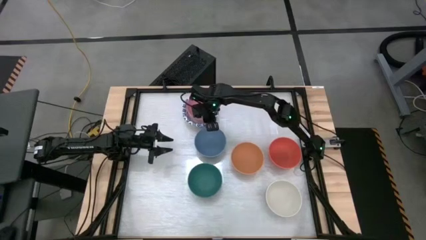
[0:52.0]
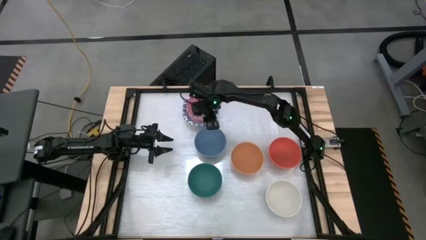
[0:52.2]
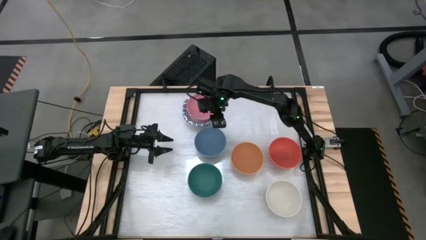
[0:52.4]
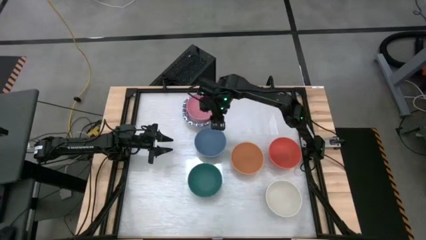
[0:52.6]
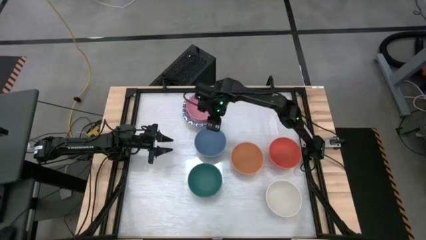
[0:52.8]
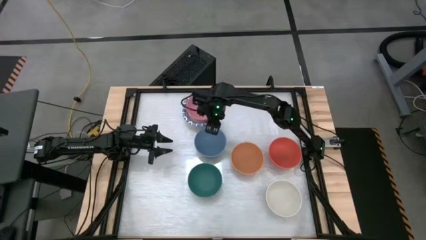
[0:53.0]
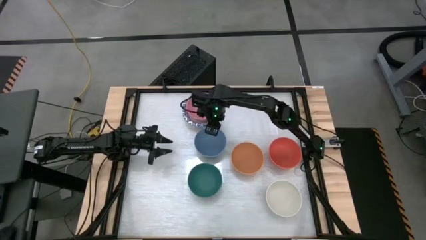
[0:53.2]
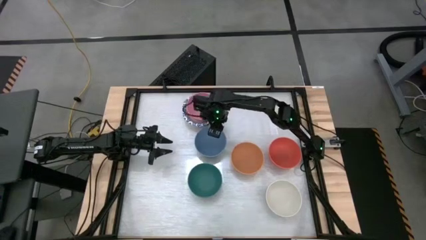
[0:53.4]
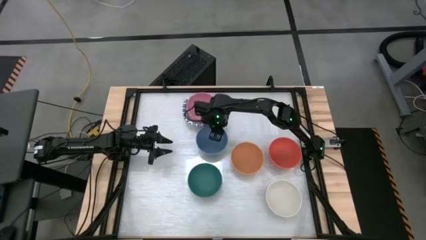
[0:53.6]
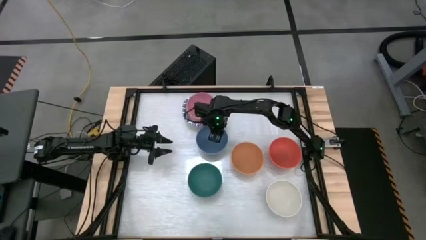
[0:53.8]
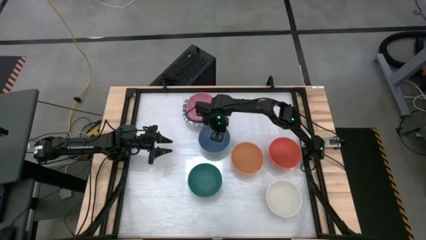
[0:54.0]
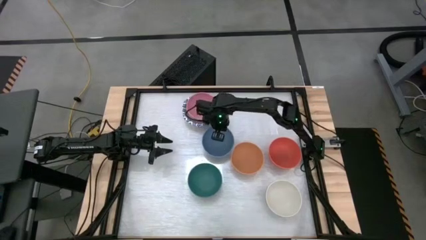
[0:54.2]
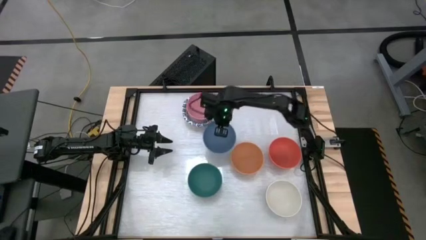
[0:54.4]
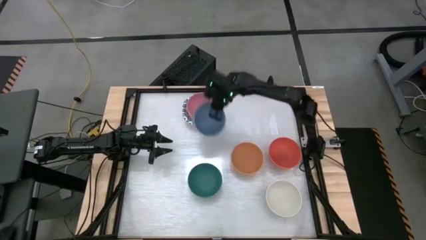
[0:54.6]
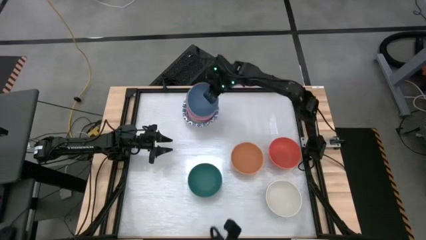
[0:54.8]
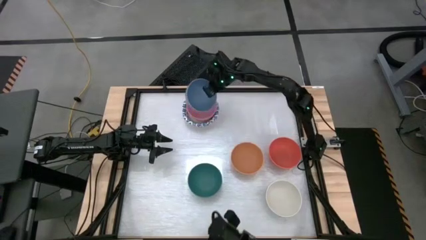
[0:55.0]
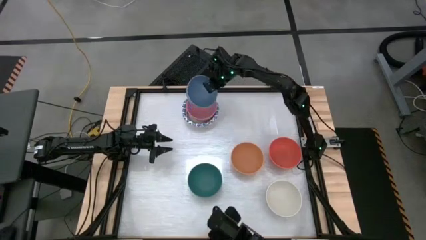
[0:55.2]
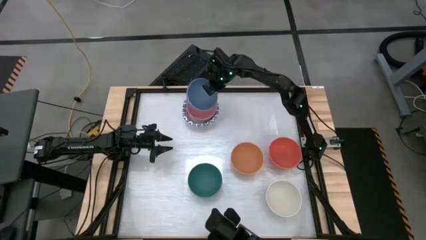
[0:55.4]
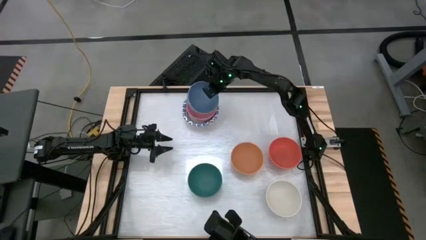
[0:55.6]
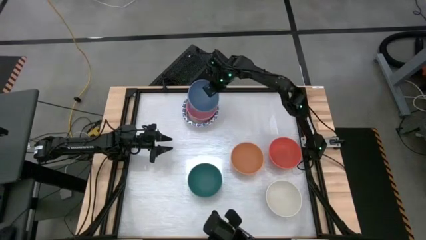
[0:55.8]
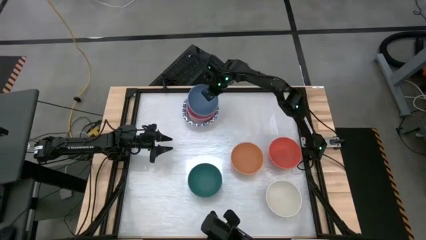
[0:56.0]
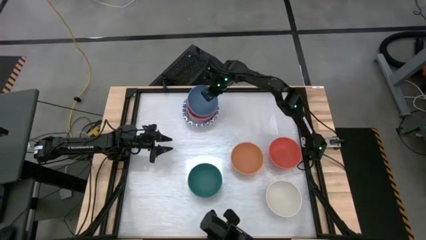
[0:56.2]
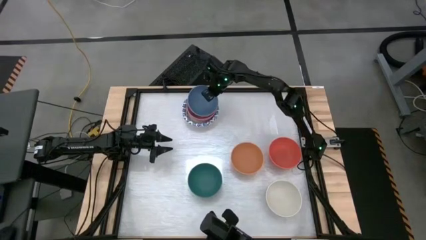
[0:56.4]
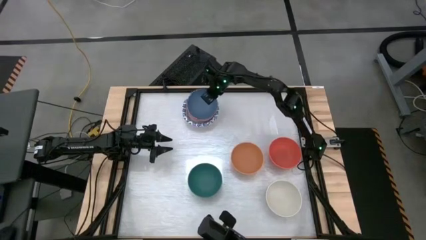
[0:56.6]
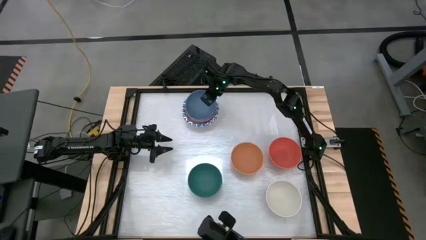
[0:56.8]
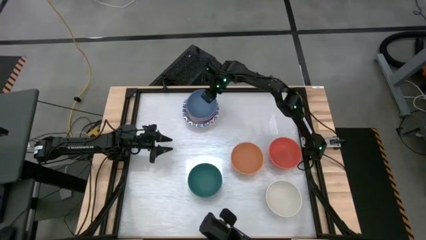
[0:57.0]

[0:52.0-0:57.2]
Stack the blue bowl on top of the pink bowl

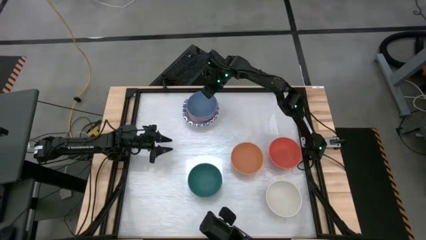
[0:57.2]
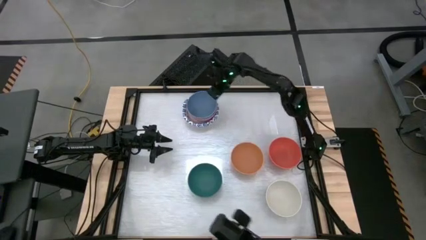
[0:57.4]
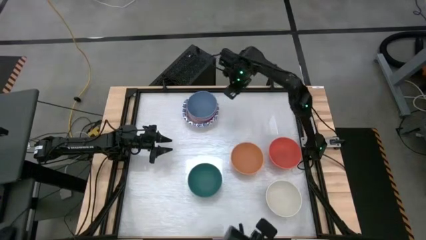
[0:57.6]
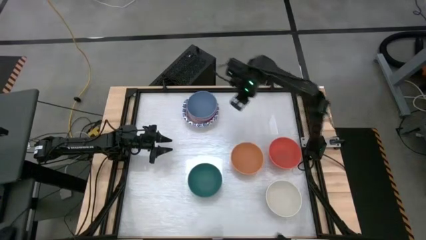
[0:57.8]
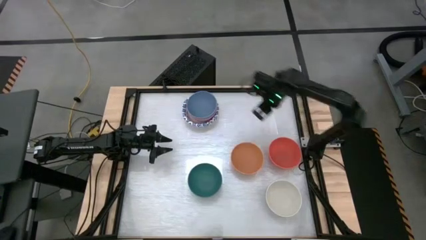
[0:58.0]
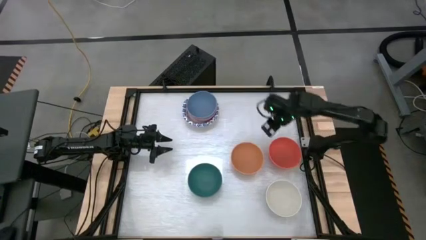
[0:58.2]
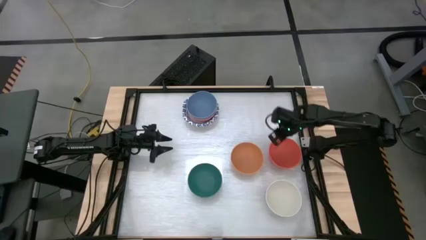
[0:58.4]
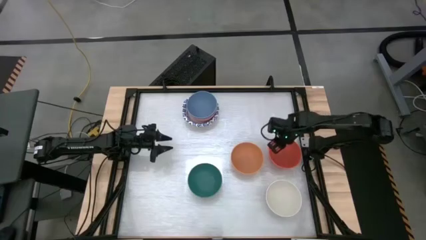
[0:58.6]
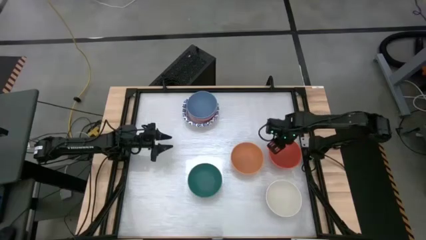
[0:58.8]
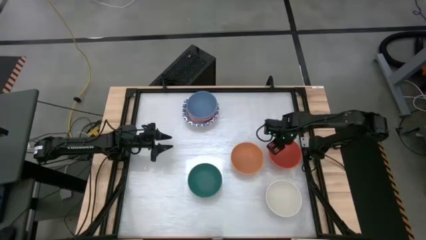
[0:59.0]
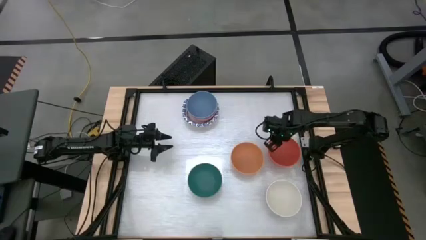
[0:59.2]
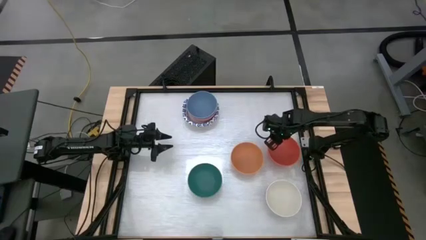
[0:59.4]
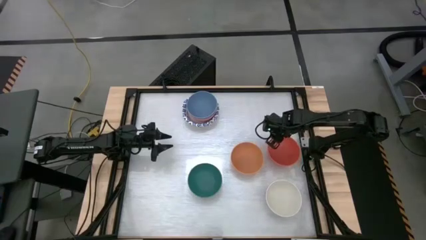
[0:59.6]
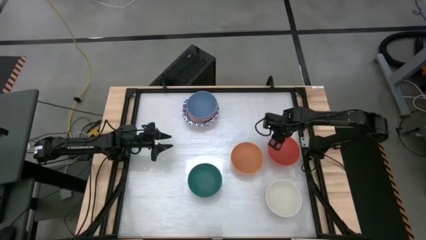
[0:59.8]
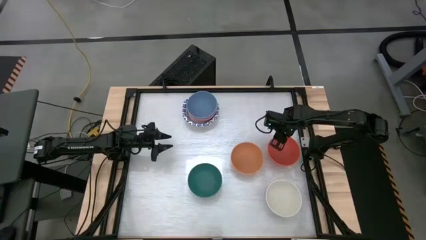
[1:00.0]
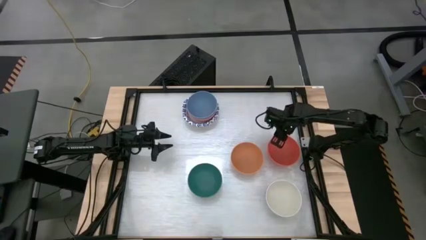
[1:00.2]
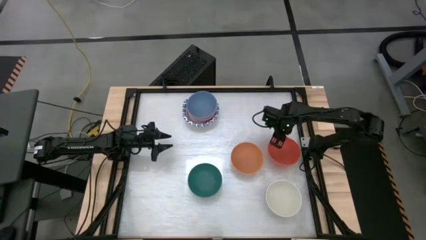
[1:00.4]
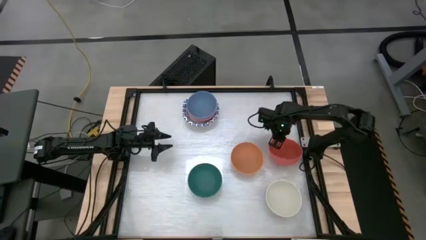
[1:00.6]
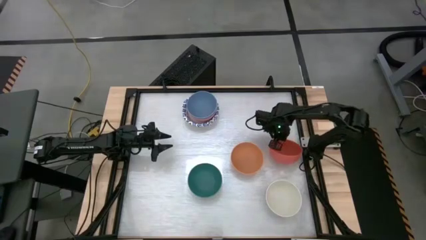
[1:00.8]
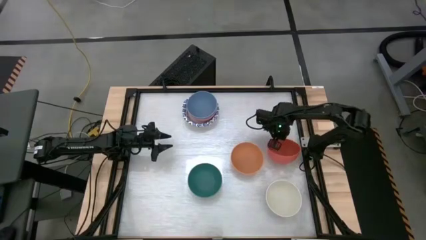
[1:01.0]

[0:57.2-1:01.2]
Stack the orange bowl on top of the blue bowl

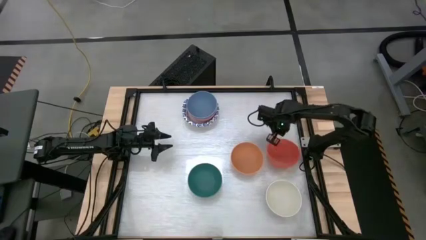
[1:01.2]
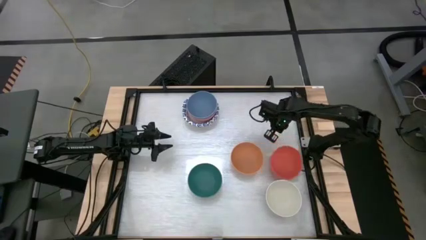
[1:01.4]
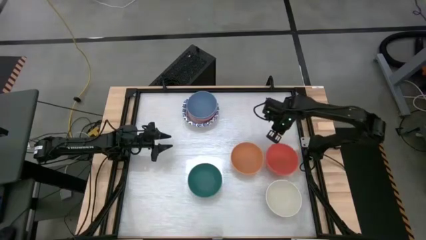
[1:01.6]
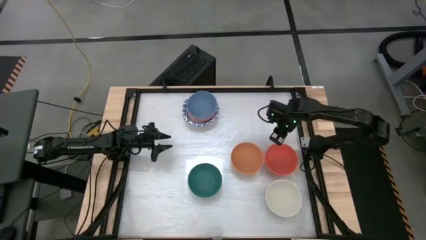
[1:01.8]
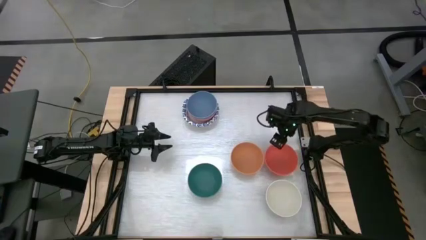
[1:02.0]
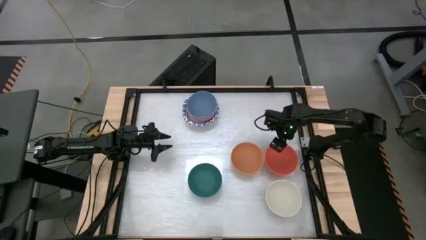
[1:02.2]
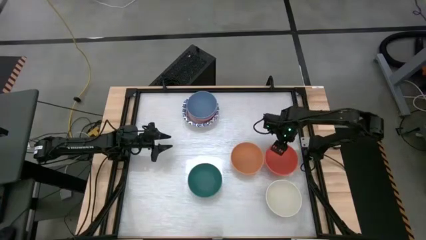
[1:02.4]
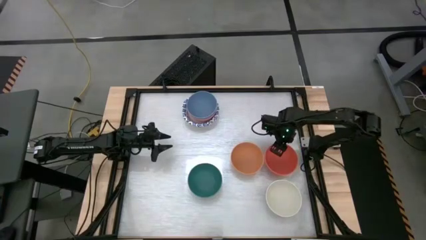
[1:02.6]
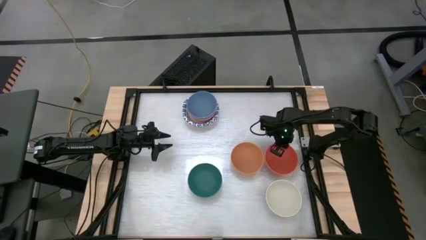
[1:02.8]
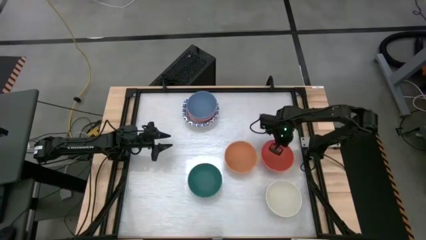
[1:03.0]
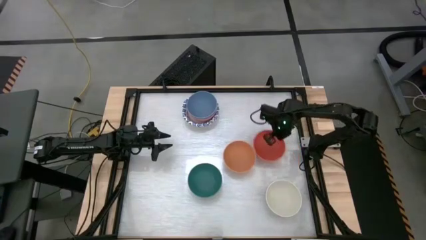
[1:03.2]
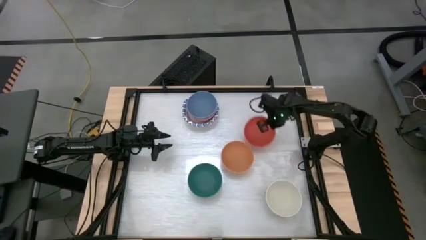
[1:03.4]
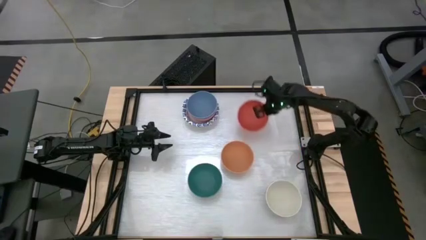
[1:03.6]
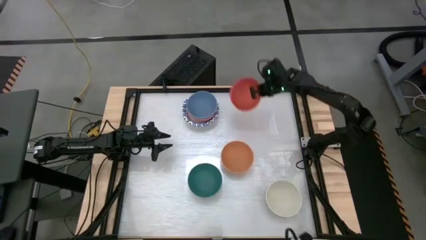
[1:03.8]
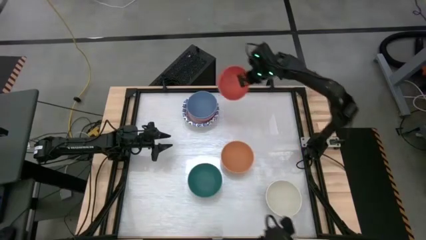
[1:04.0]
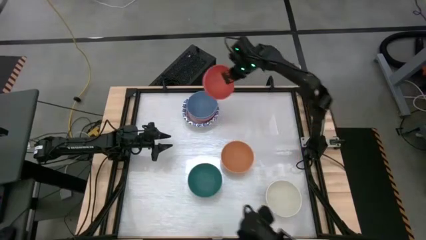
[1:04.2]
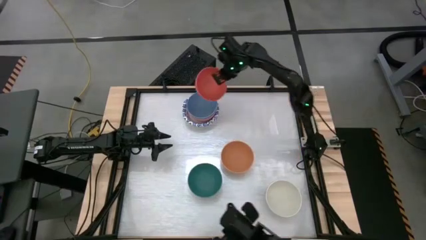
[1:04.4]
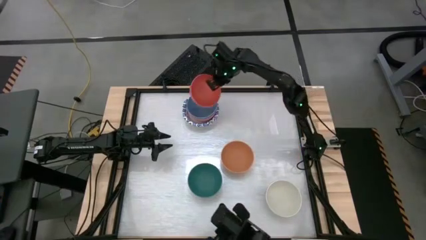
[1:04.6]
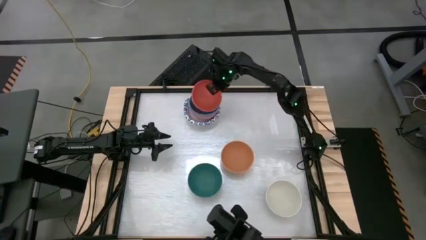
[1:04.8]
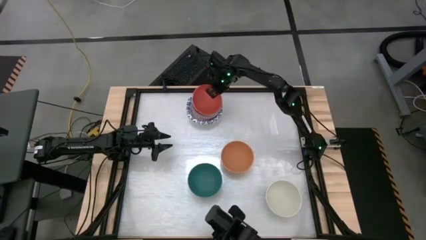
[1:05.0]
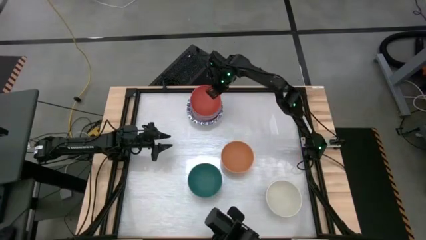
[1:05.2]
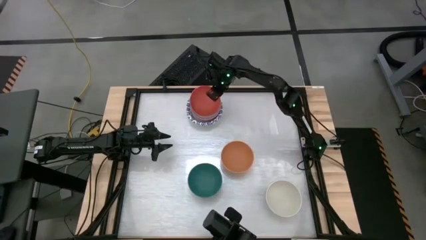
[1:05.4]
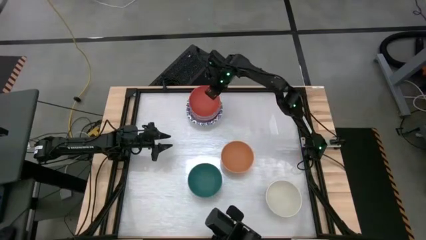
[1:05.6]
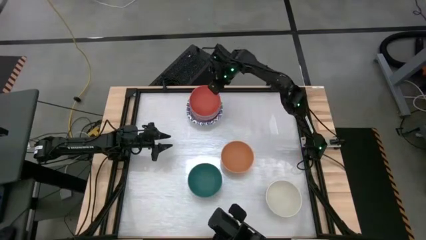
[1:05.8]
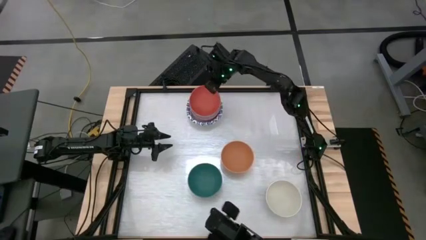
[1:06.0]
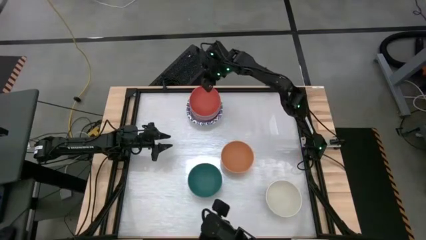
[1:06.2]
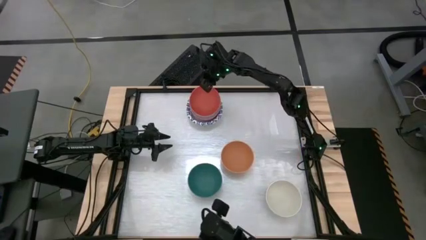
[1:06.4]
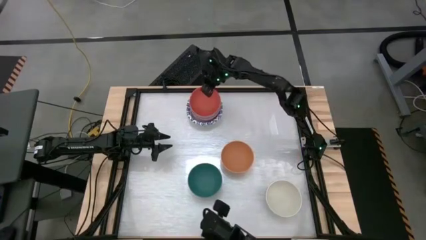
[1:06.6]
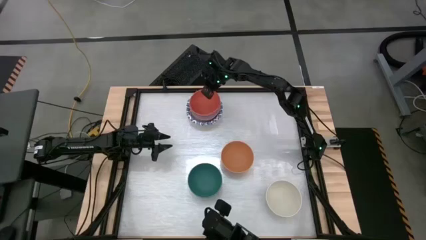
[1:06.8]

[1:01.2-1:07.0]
Stack the orange bowl on top of the blue bowl
